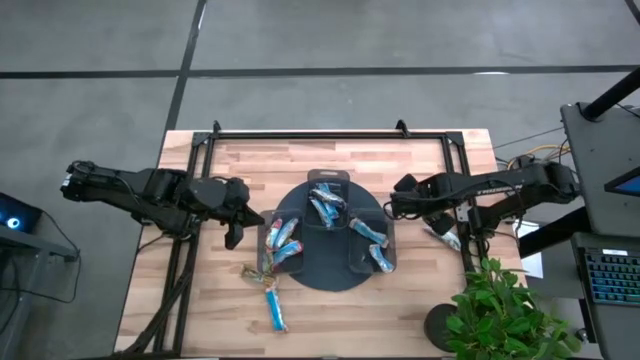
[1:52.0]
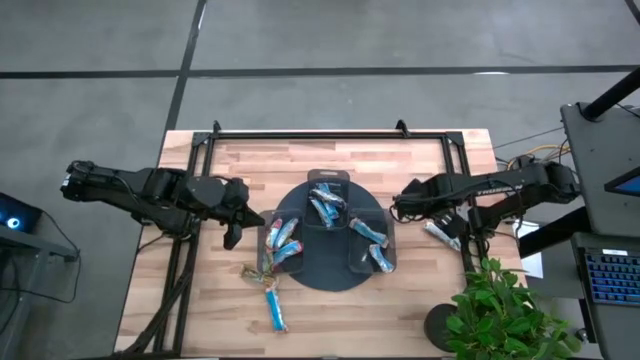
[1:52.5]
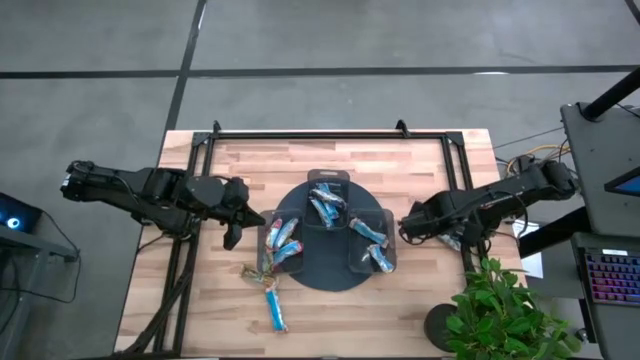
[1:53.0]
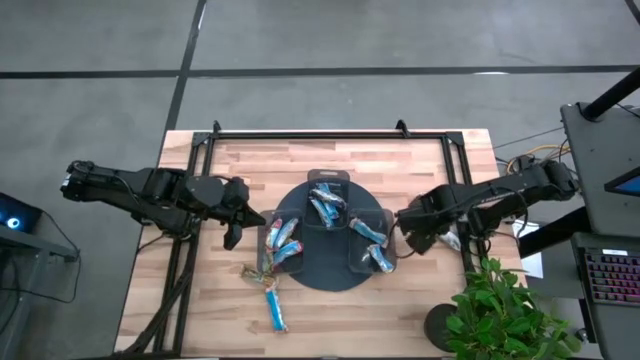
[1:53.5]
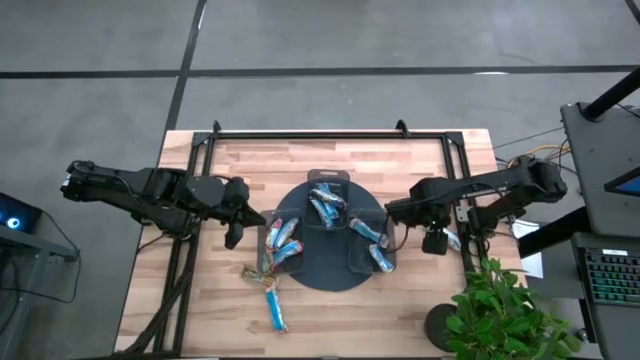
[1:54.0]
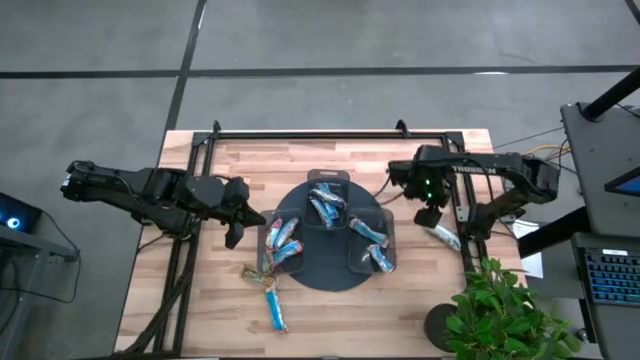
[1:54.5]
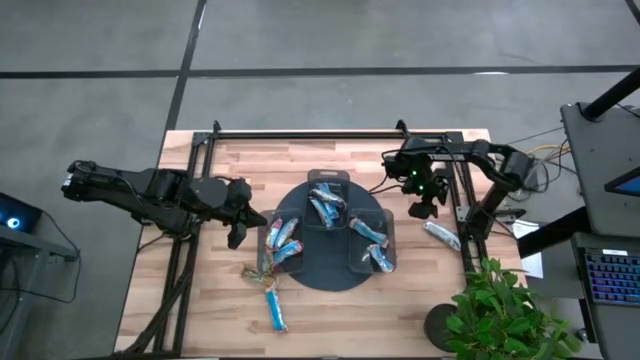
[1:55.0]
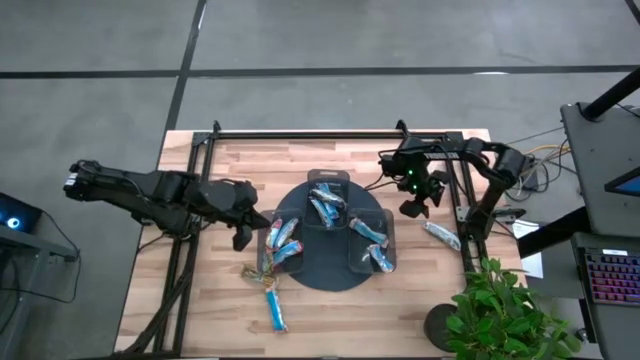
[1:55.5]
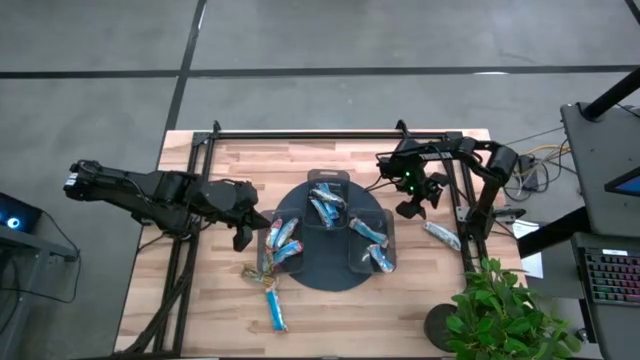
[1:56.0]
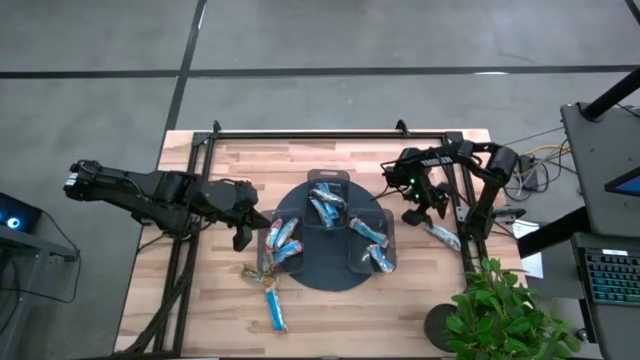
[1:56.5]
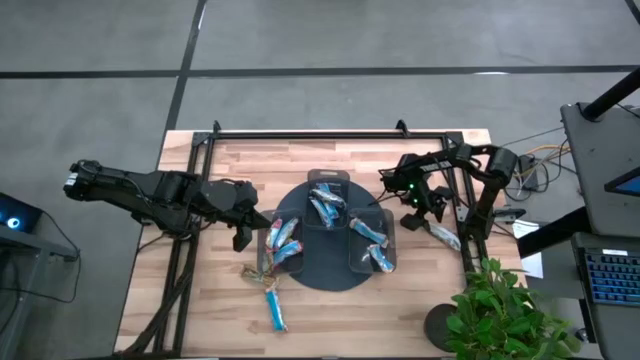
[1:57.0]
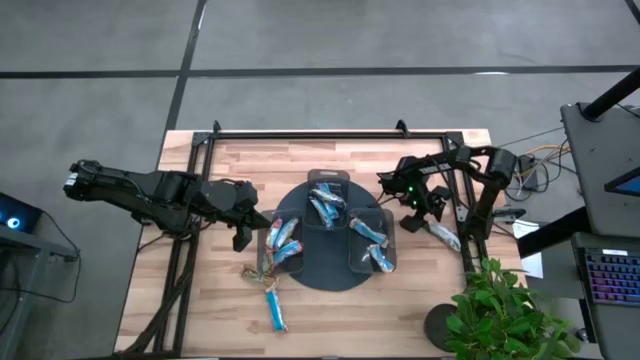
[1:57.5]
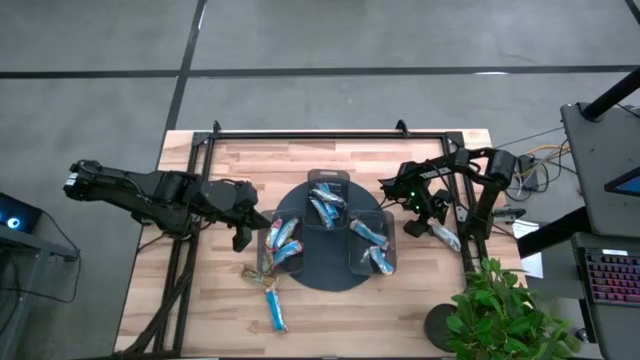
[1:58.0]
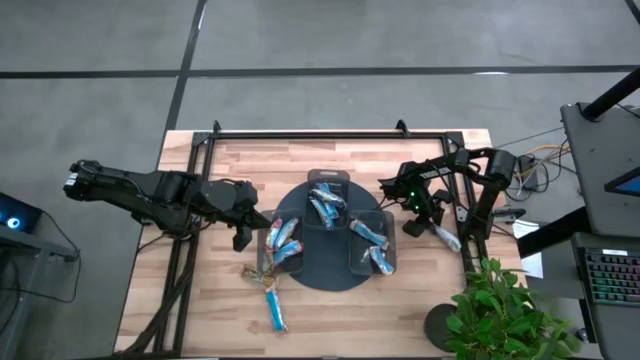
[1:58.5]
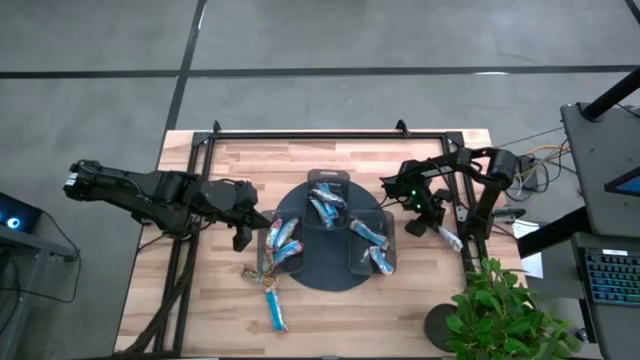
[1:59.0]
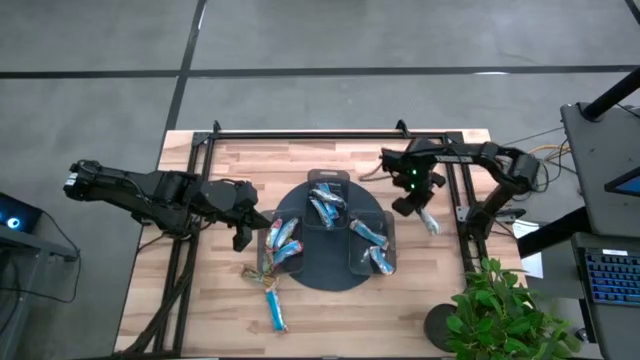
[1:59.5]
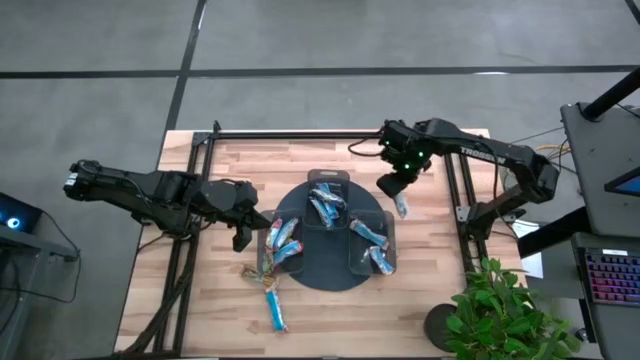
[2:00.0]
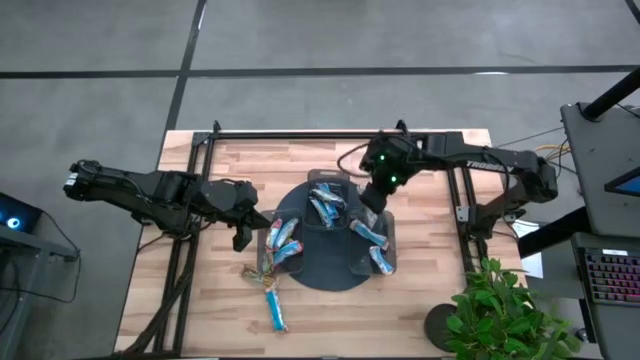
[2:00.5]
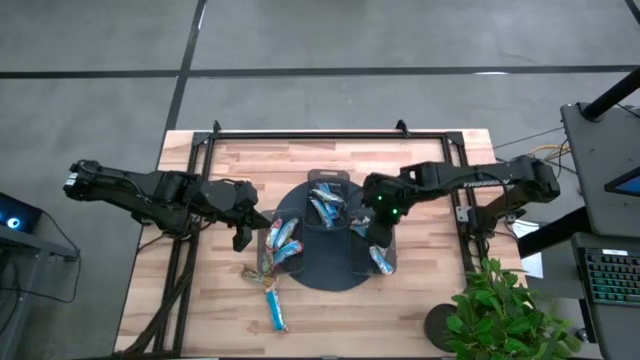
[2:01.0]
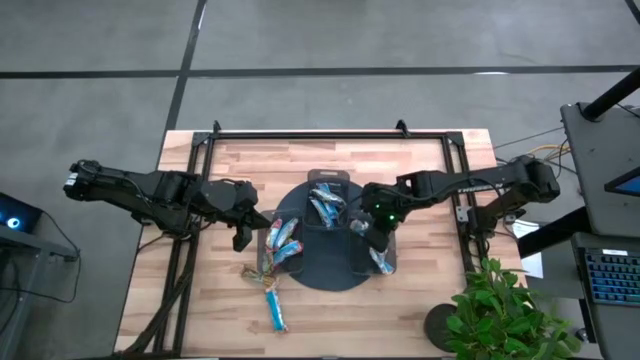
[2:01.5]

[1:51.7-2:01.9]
Task: Pick and place Granola Bars by type
Put the yellow granola bar into the bottom right black bin

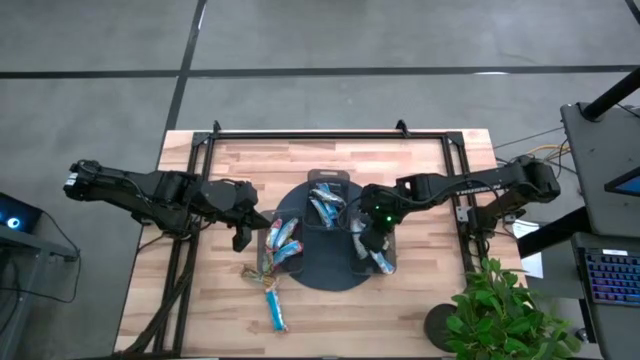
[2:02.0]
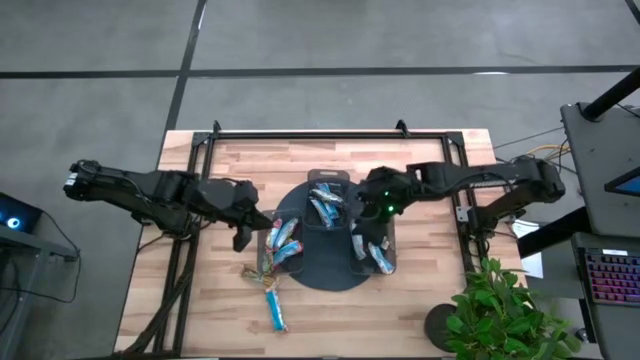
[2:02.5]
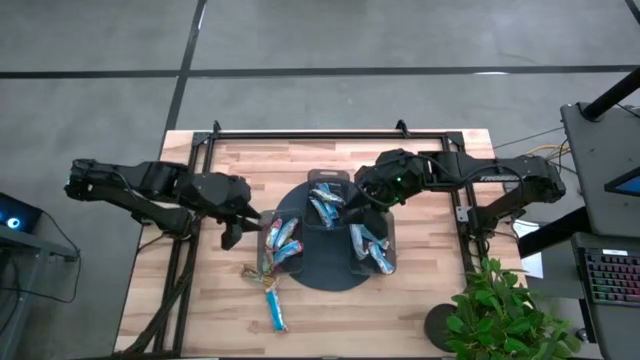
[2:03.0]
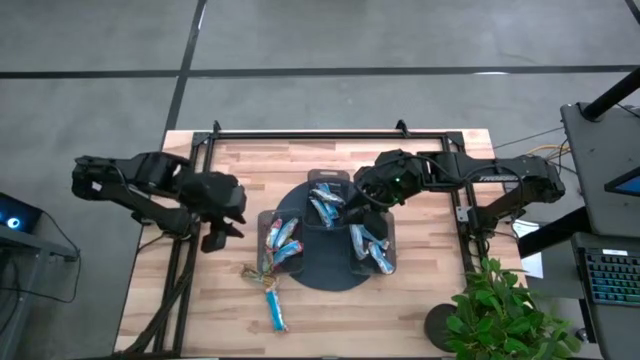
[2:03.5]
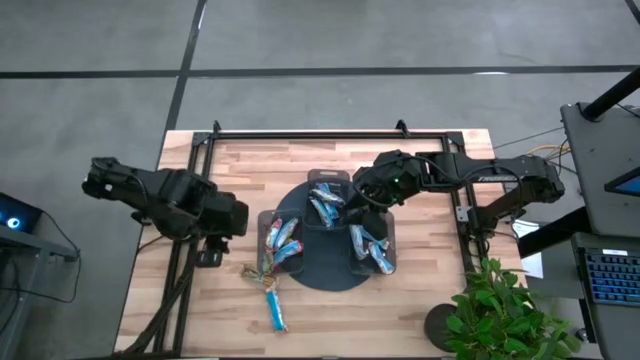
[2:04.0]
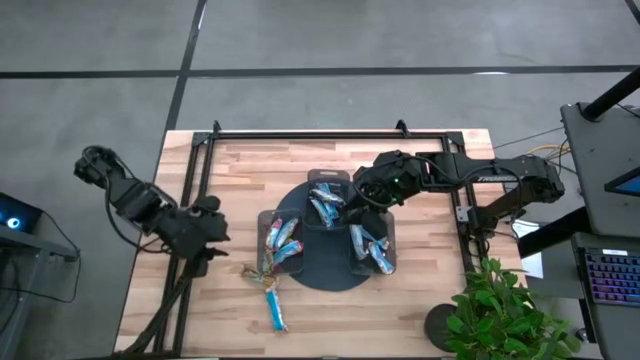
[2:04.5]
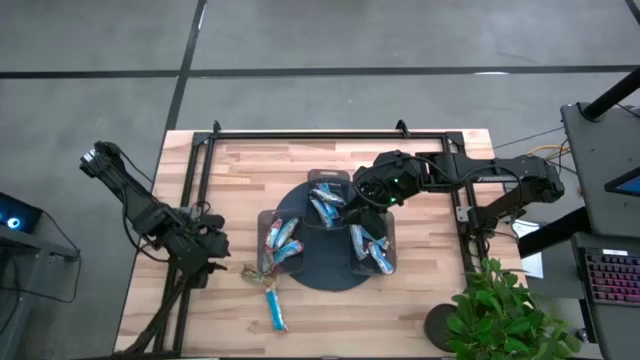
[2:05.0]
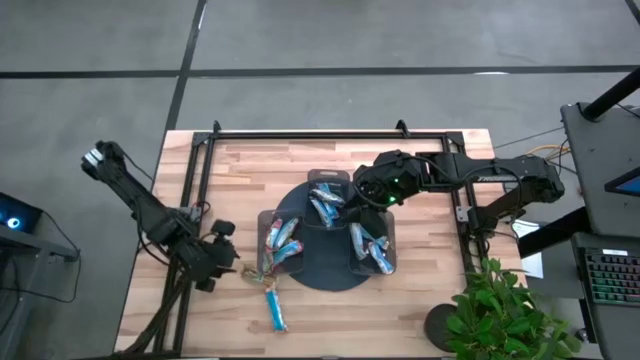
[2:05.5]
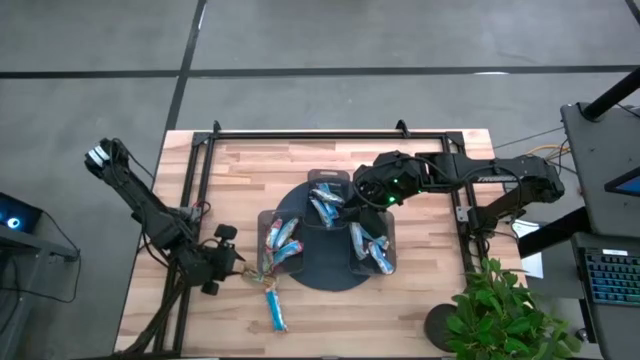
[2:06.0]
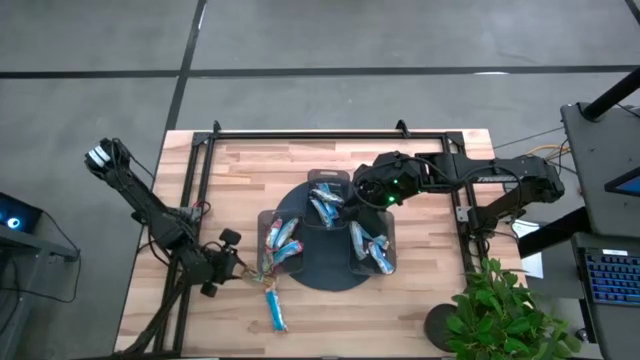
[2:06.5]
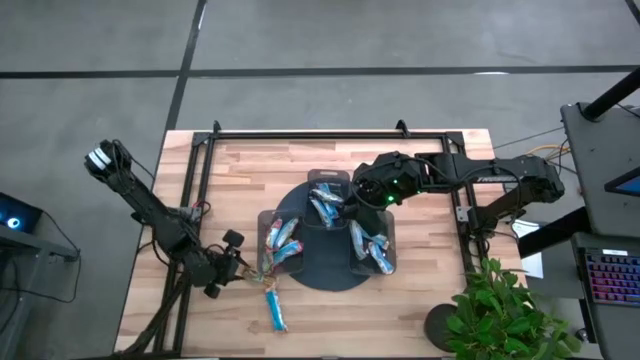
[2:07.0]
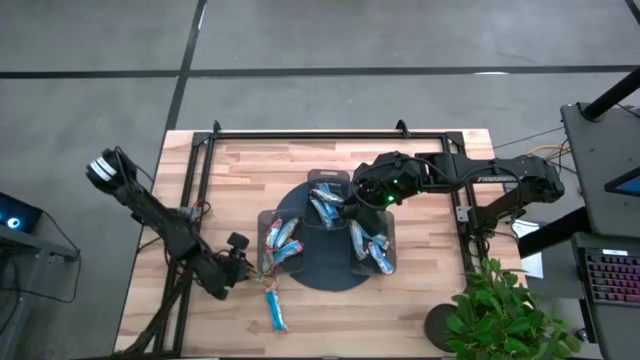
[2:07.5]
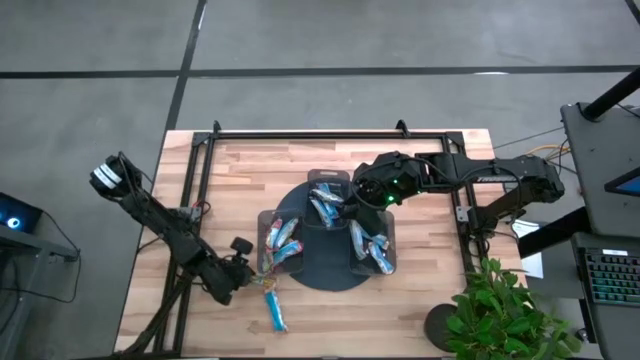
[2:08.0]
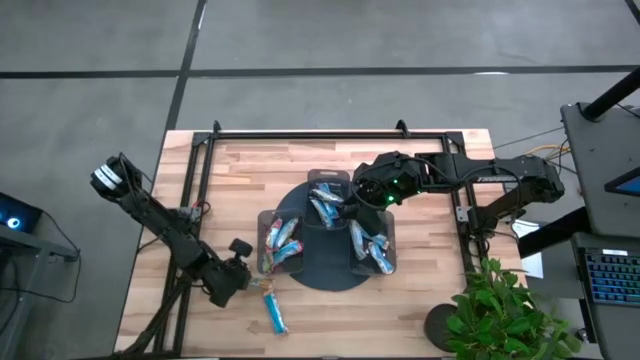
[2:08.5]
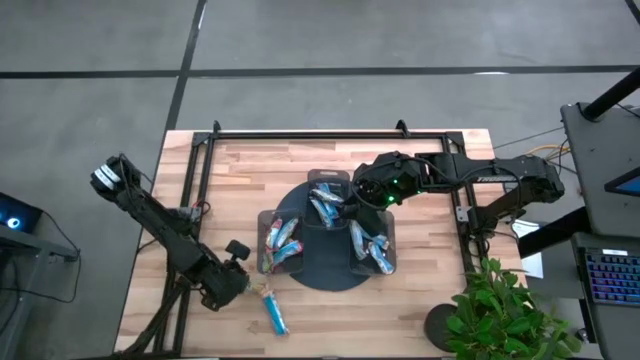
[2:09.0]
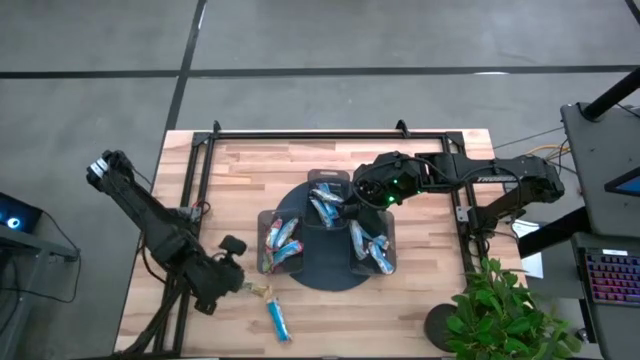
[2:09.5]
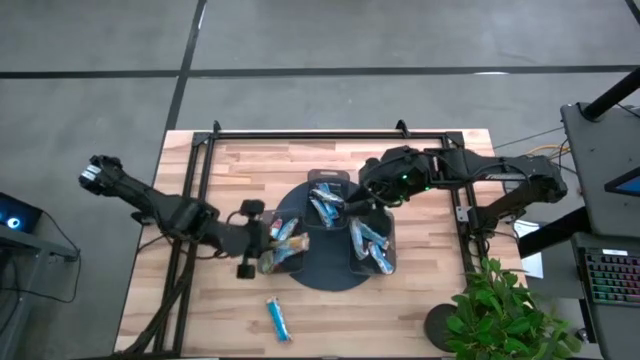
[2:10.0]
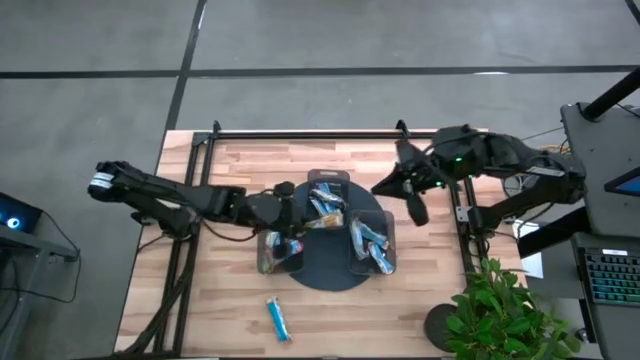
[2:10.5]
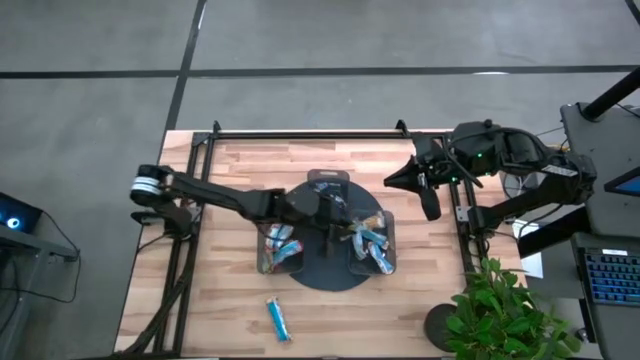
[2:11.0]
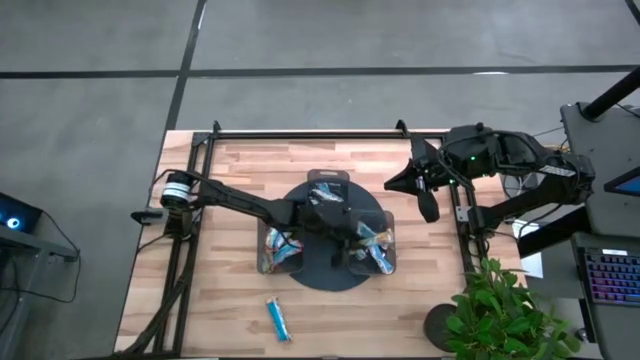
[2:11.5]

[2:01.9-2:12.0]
Put the yellow granola bar into the bottom right black bin

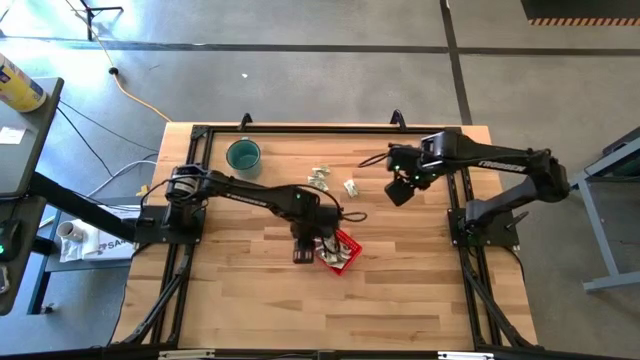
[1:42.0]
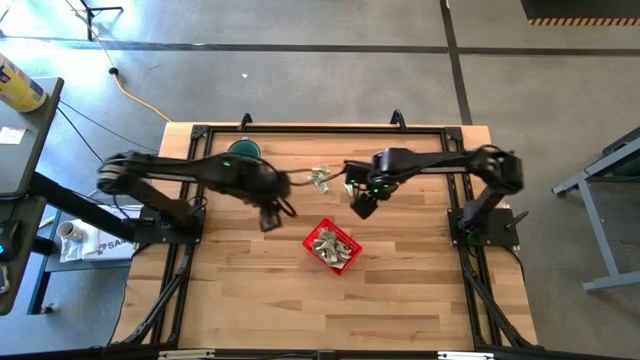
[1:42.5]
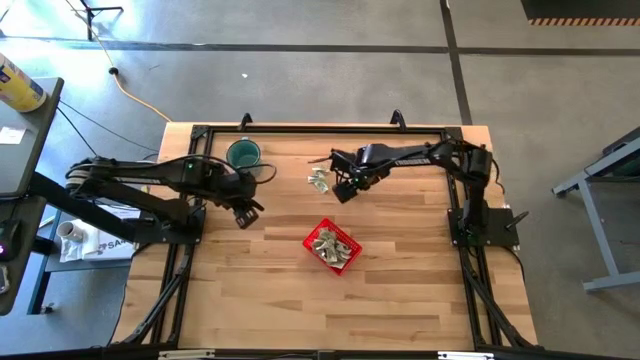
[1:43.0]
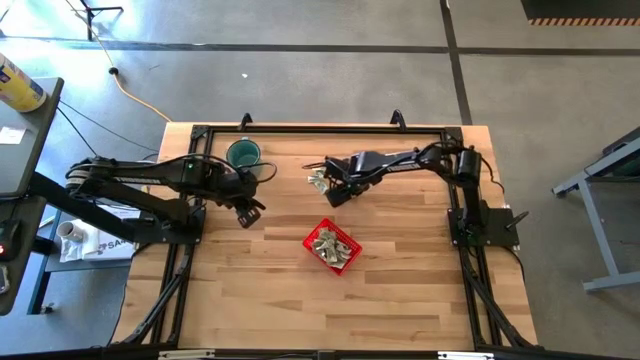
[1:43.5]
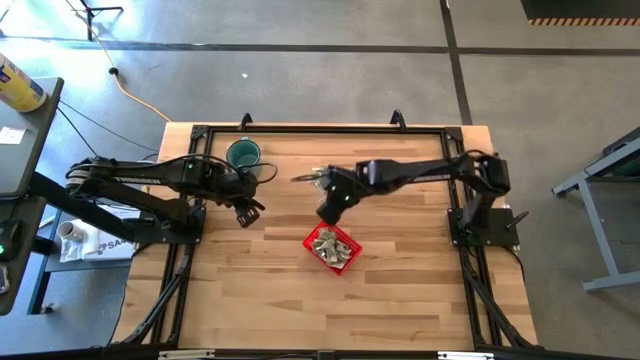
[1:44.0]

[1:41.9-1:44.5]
Task: Pick and place Stevia / Truvia into bins
Put the light green stevia packet into the bin
